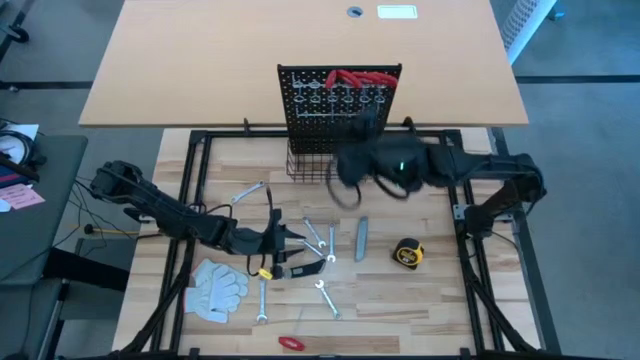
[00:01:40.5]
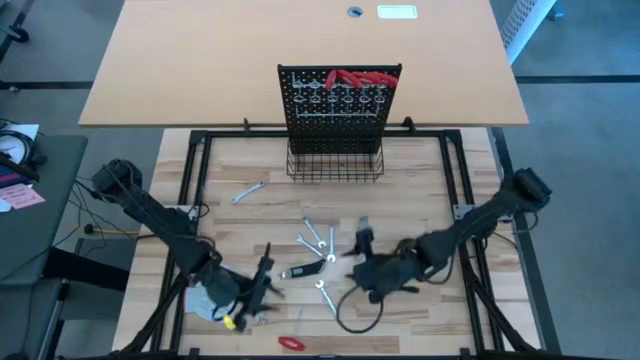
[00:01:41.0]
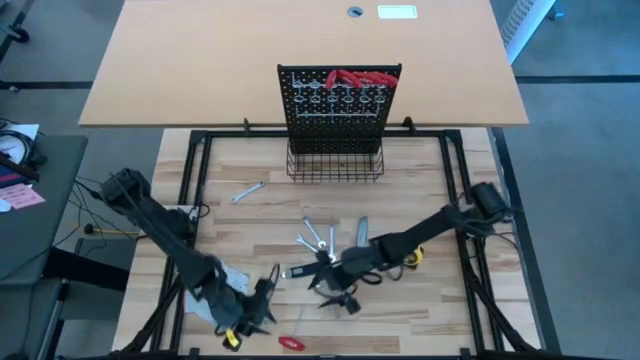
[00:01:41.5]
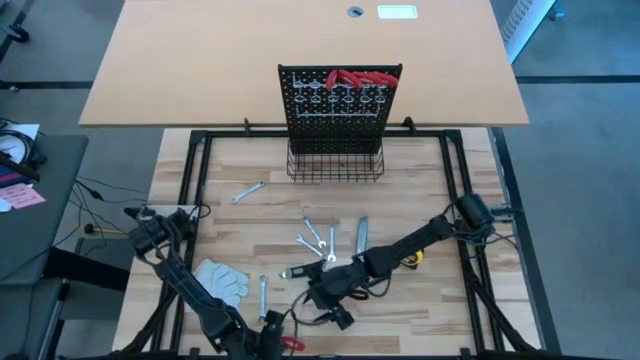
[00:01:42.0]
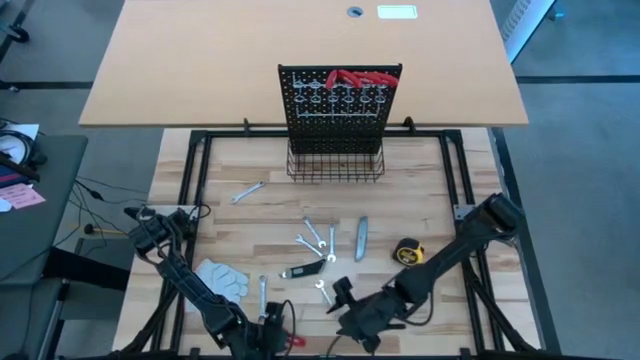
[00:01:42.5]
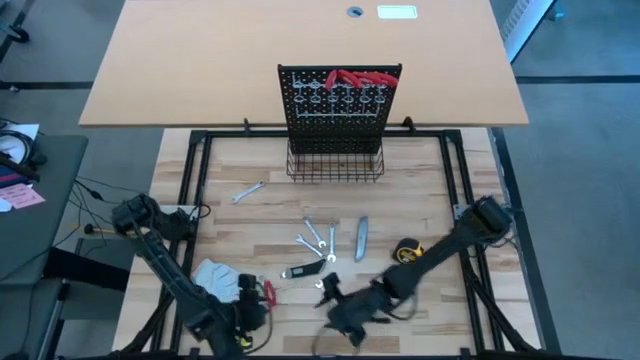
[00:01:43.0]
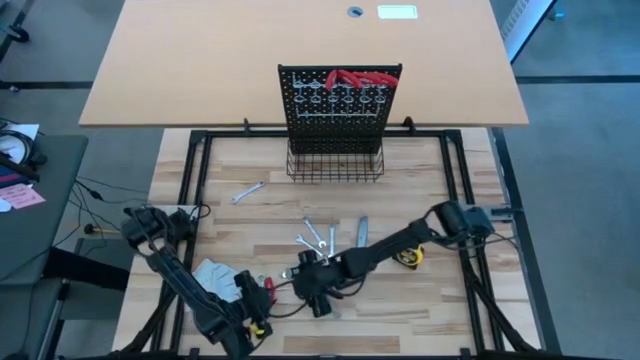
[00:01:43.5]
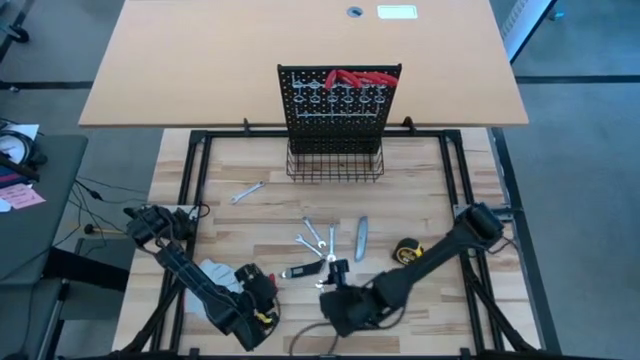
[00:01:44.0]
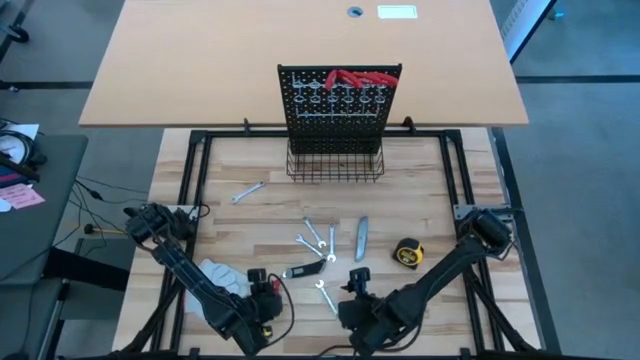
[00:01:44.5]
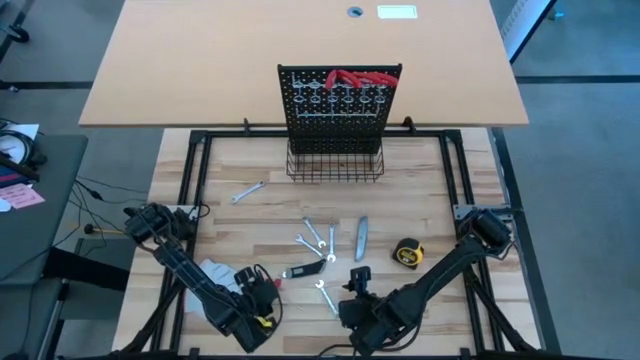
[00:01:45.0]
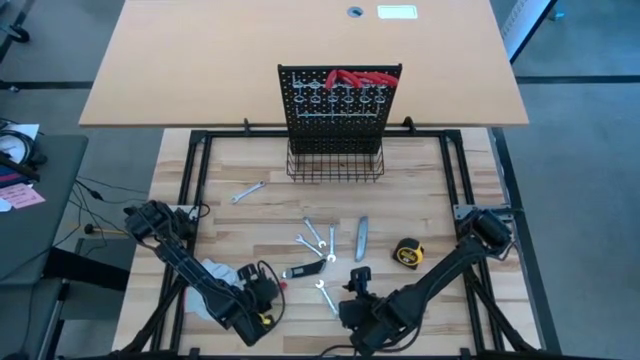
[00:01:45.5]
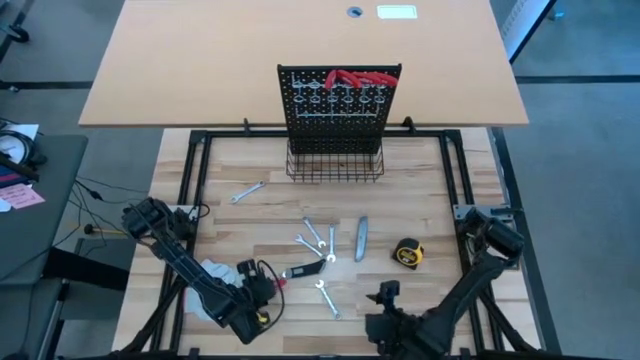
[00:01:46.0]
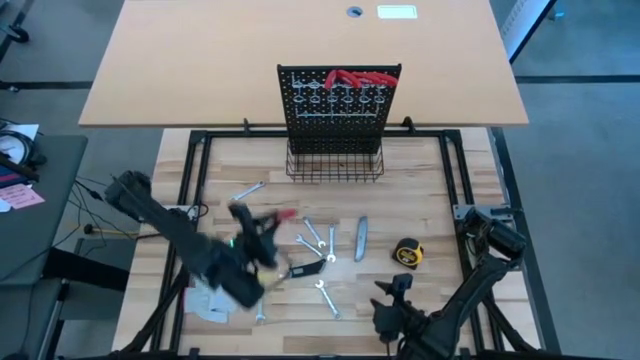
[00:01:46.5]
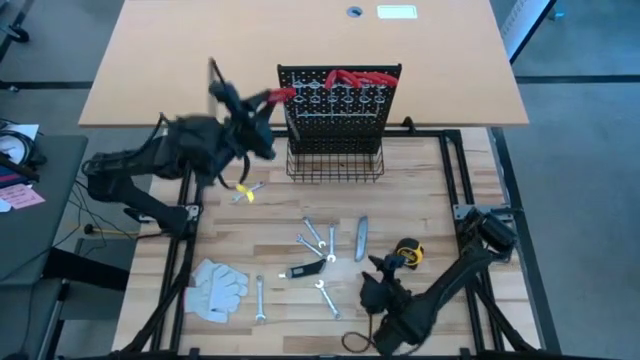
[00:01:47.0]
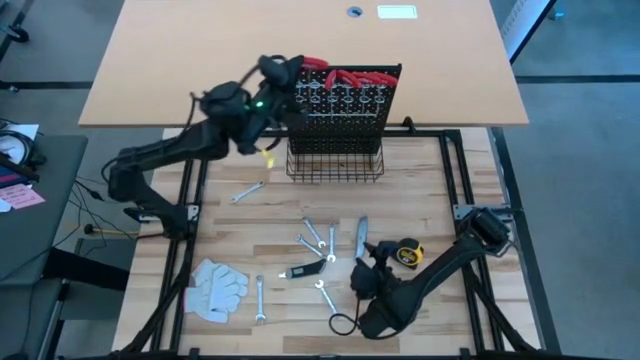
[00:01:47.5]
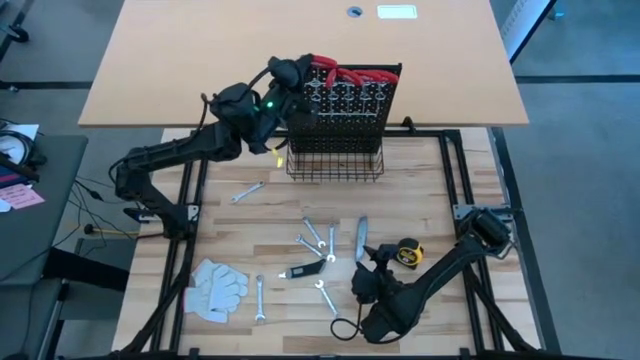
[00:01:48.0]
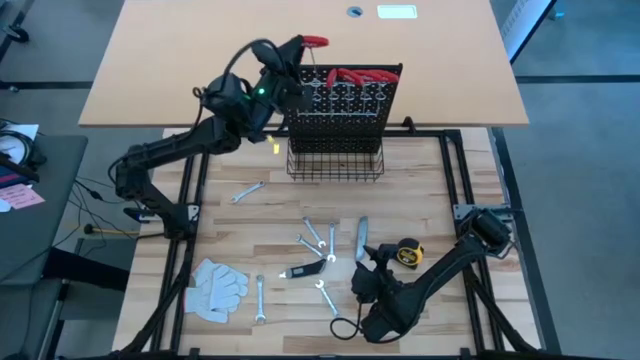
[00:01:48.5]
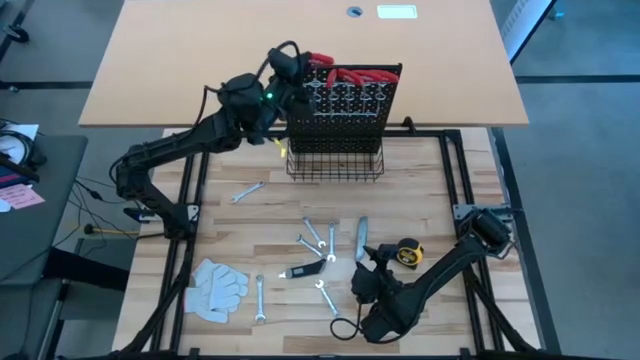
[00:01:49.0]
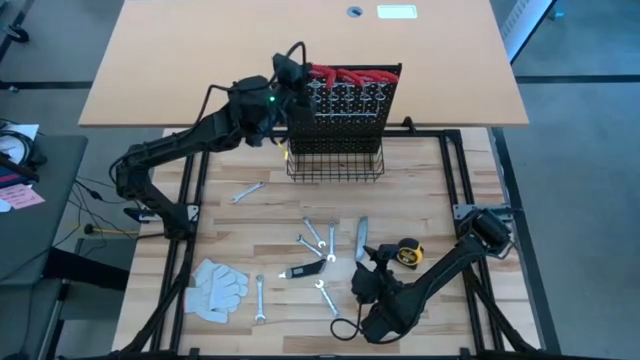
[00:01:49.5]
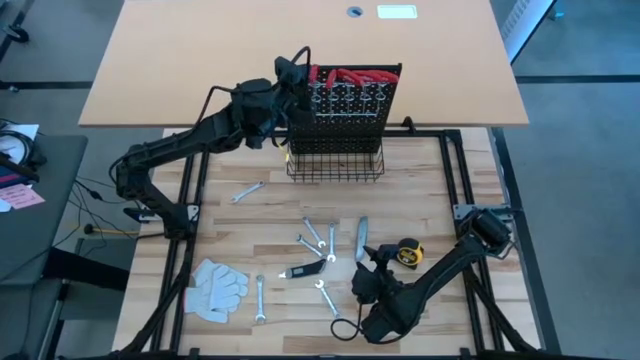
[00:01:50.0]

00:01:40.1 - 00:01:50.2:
Task: Hang tools onto peg board
Hang the red allen wrench on the pegboard

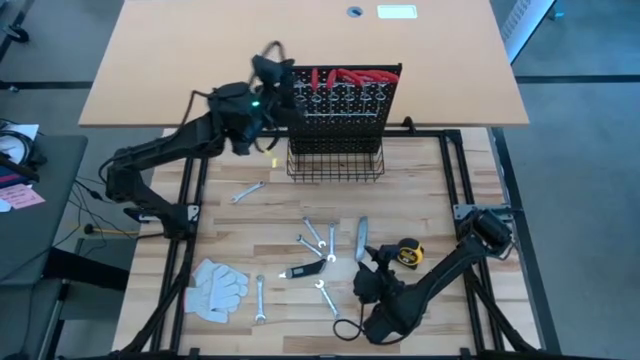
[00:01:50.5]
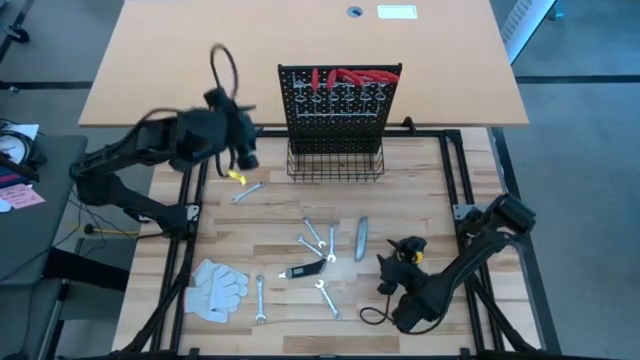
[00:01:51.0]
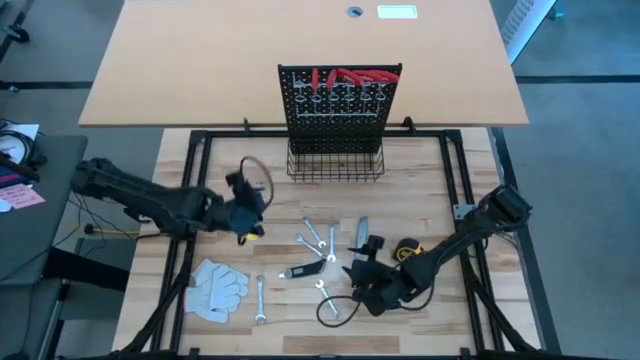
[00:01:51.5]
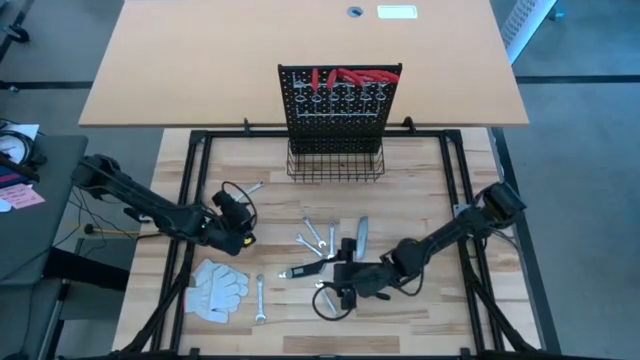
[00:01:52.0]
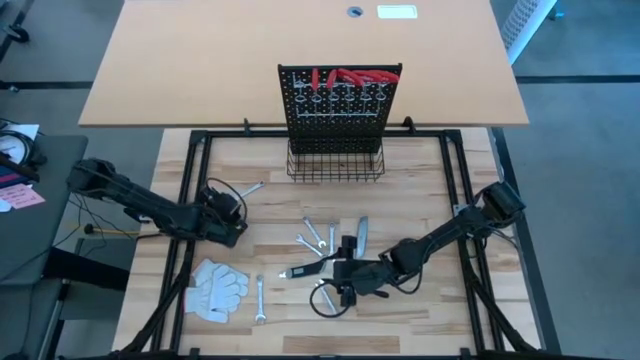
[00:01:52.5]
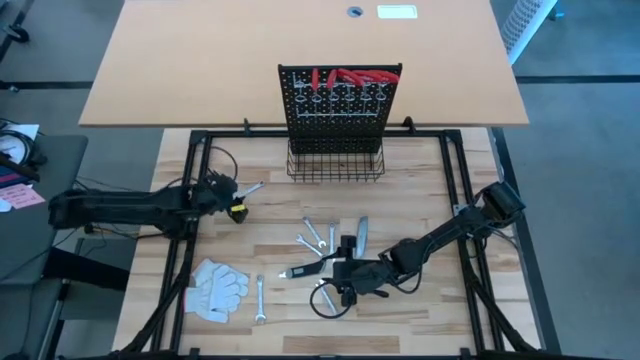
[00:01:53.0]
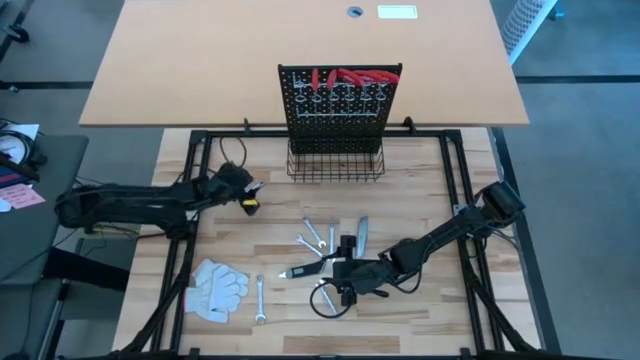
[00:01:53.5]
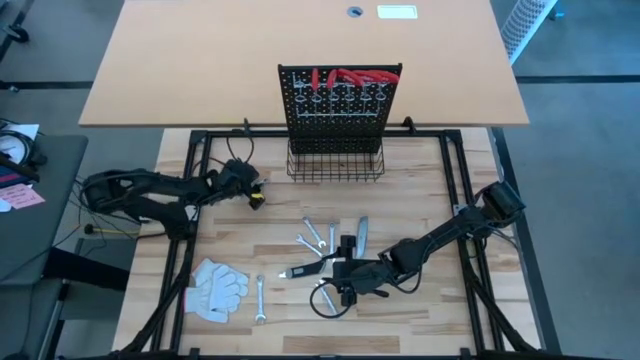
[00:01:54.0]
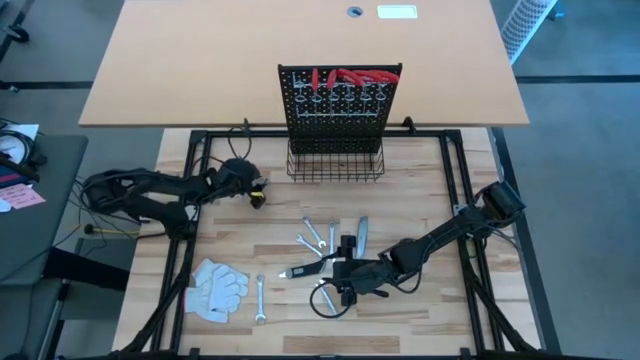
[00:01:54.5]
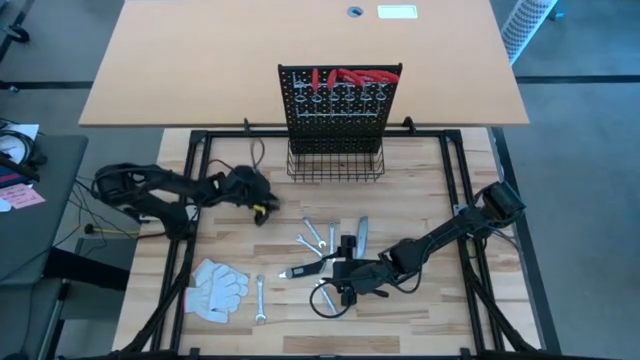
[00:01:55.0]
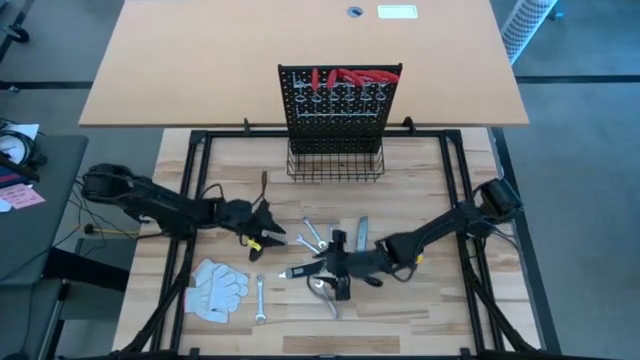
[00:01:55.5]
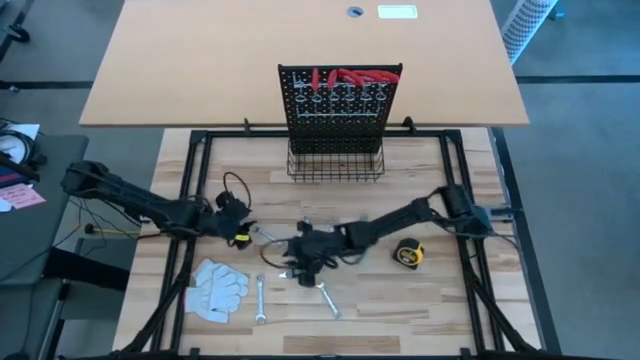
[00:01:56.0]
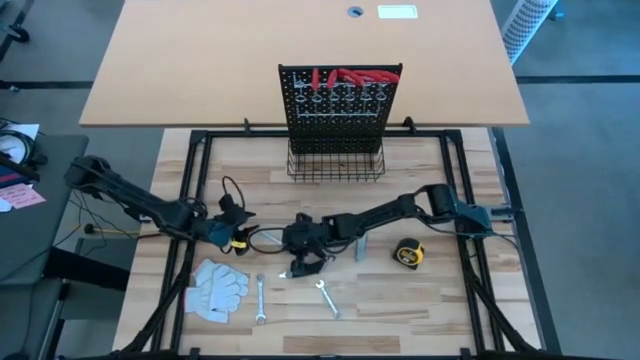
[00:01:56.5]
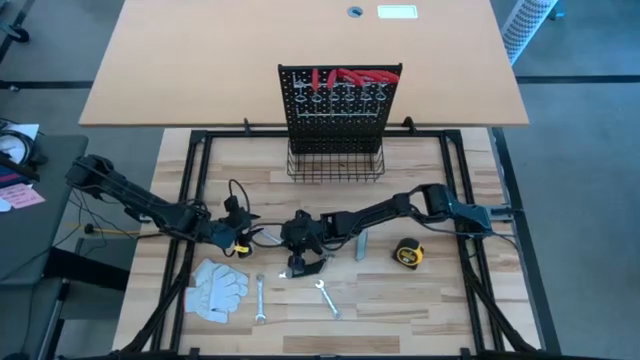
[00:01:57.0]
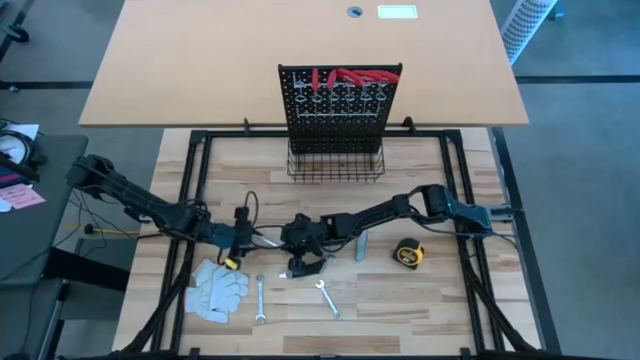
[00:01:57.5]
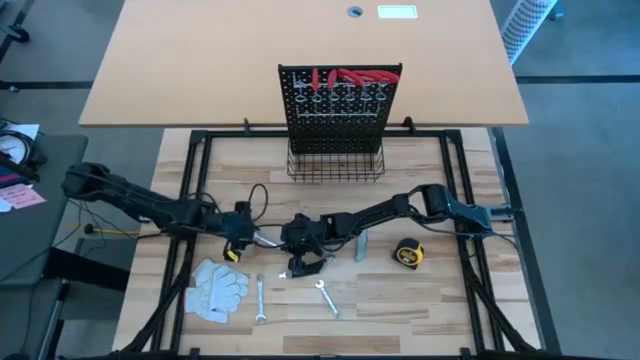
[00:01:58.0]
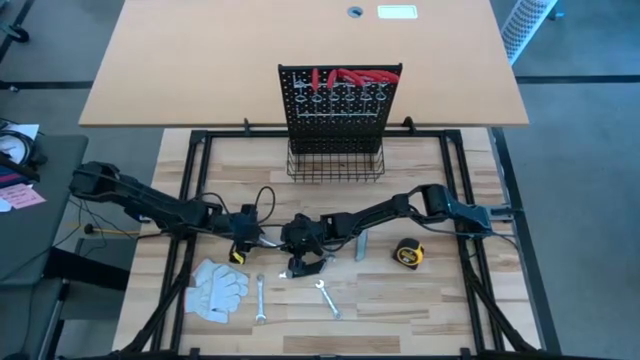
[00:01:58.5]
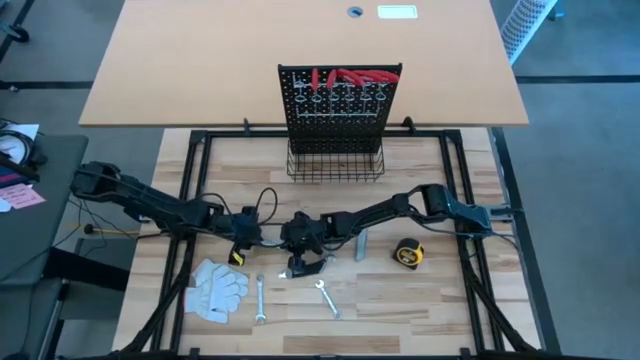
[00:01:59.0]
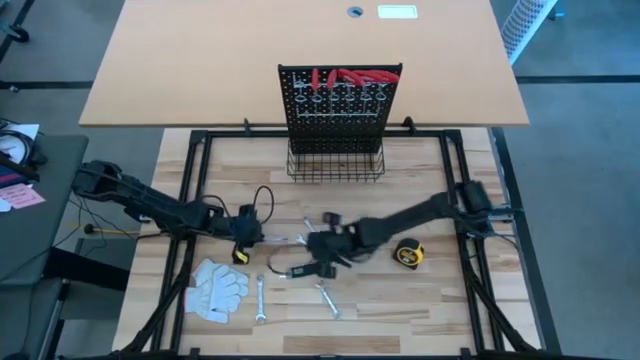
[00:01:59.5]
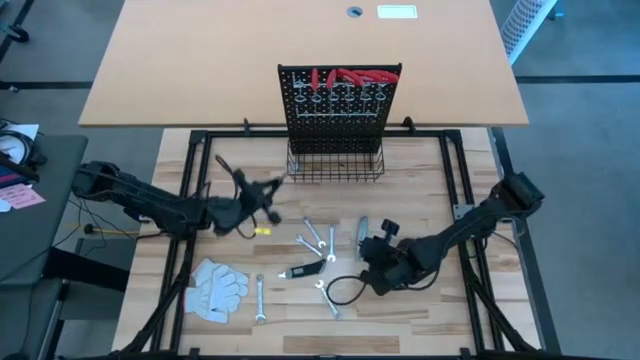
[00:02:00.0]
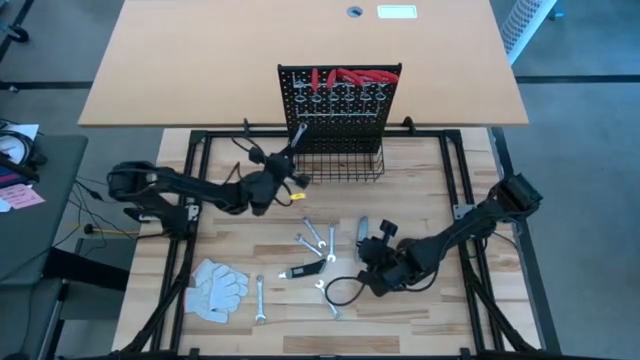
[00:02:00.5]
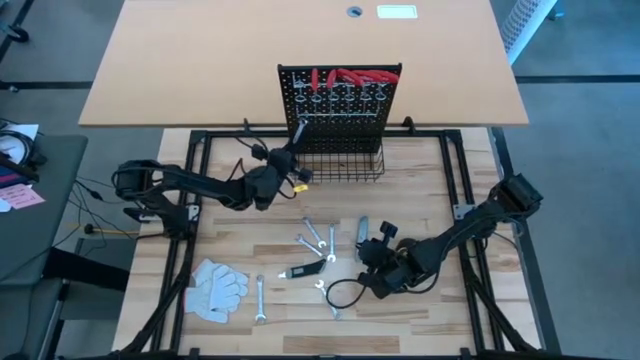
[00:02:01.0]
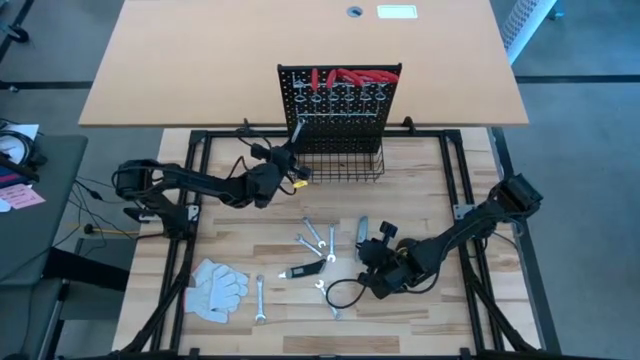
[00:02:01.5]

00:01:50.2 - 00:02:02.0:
Hang the silver wrench on the pegboard
